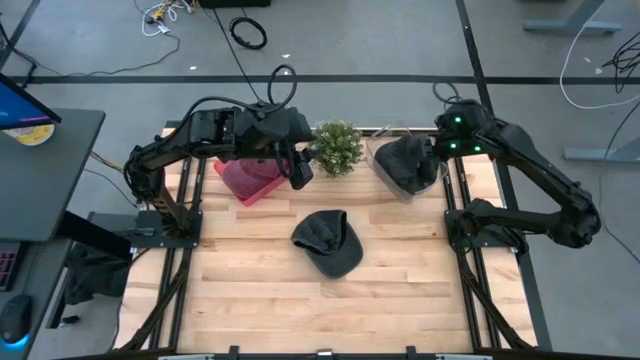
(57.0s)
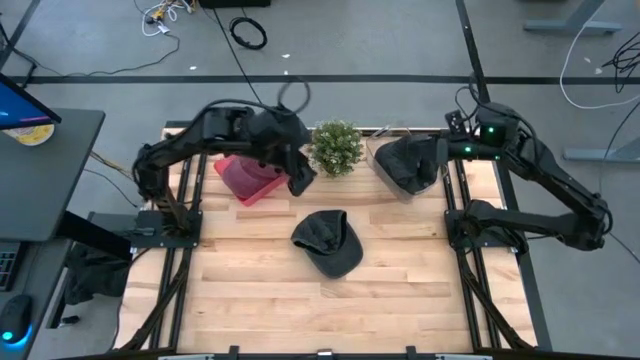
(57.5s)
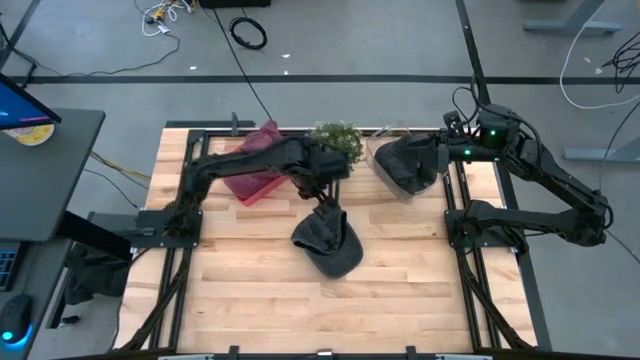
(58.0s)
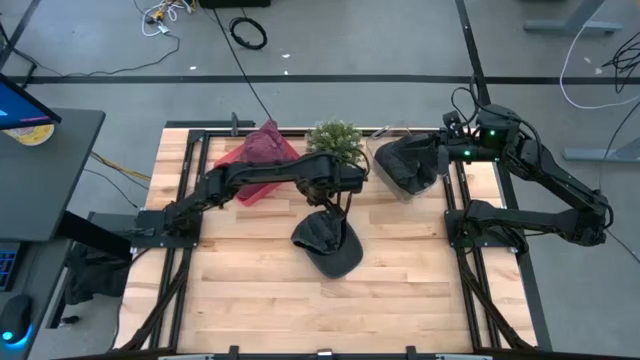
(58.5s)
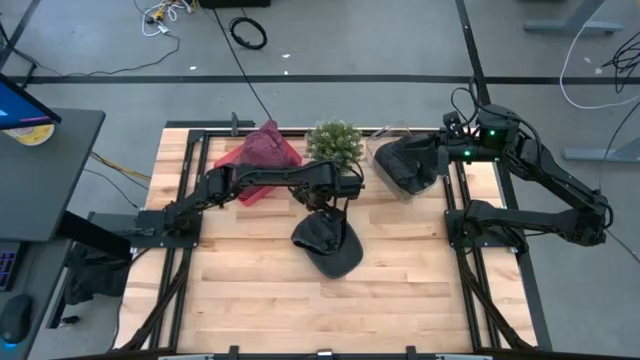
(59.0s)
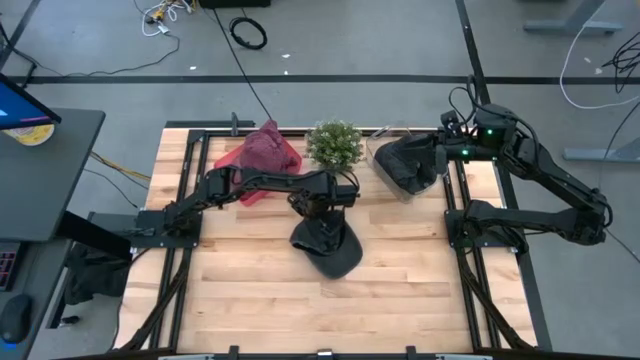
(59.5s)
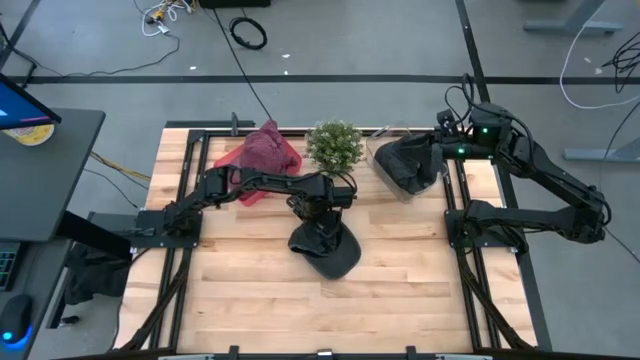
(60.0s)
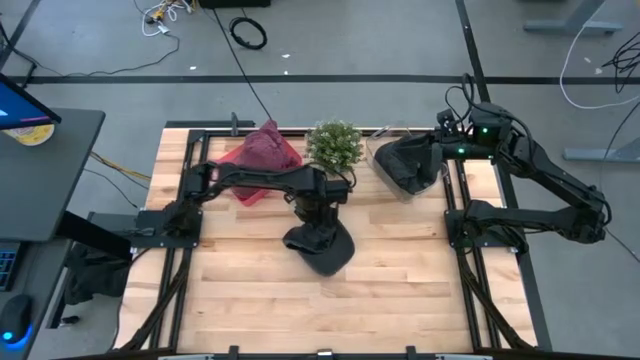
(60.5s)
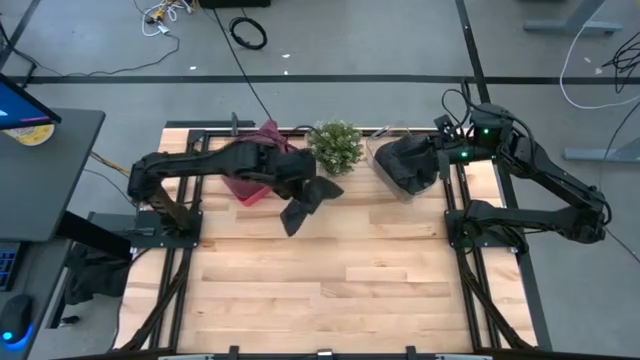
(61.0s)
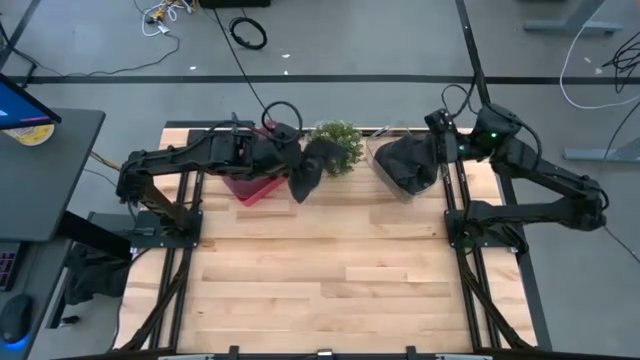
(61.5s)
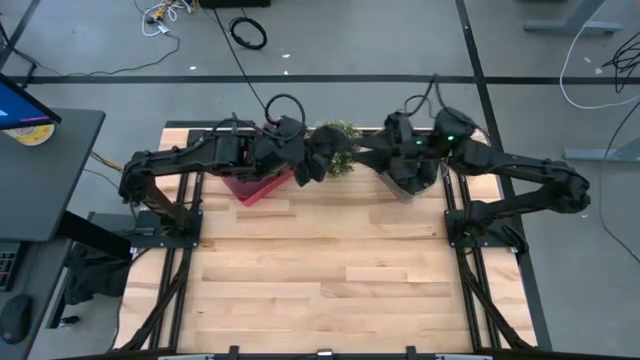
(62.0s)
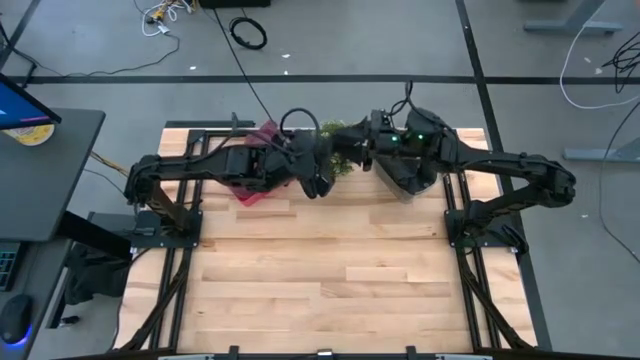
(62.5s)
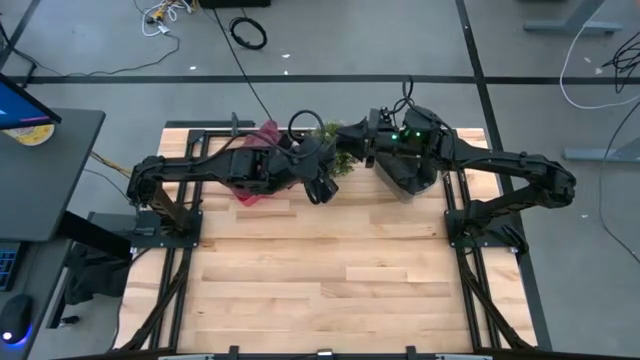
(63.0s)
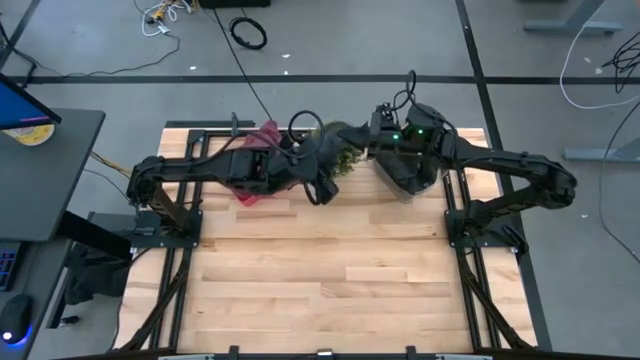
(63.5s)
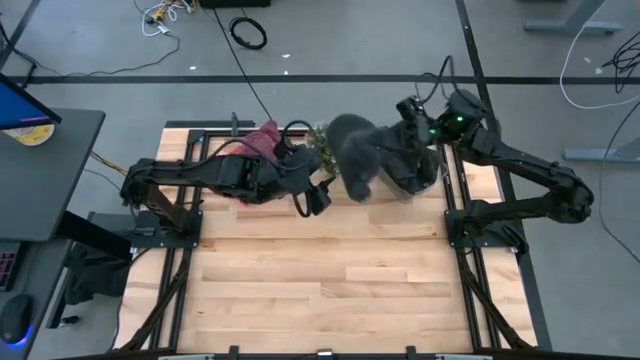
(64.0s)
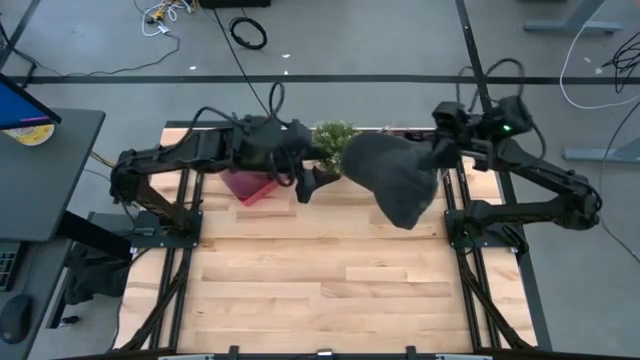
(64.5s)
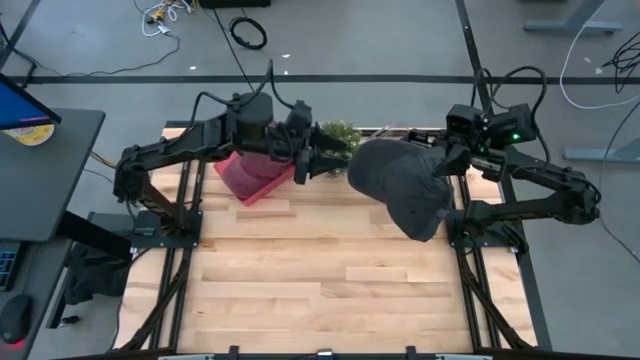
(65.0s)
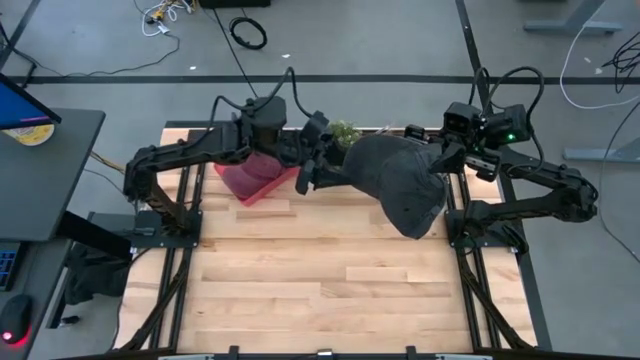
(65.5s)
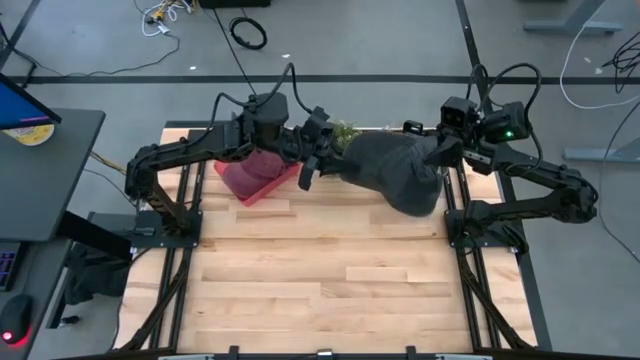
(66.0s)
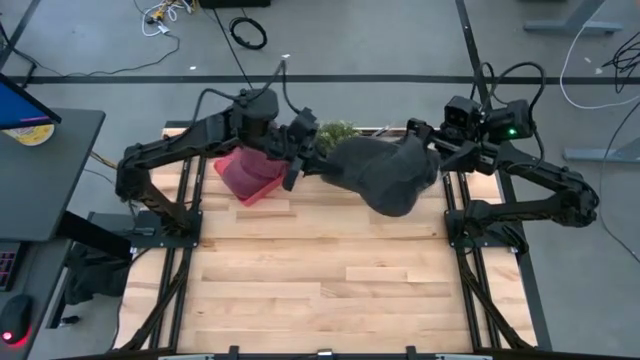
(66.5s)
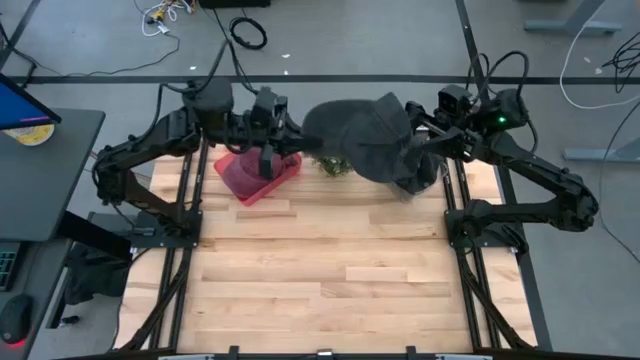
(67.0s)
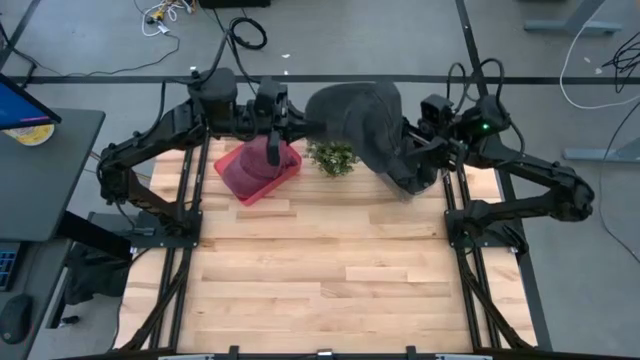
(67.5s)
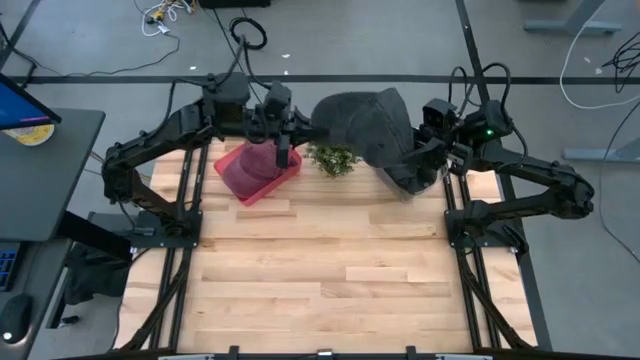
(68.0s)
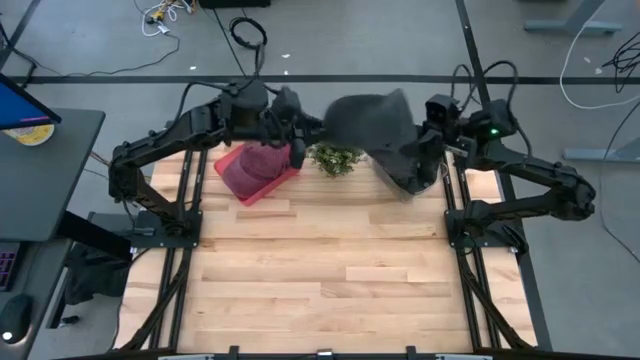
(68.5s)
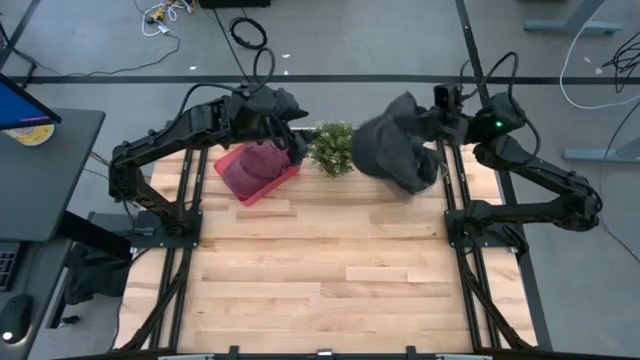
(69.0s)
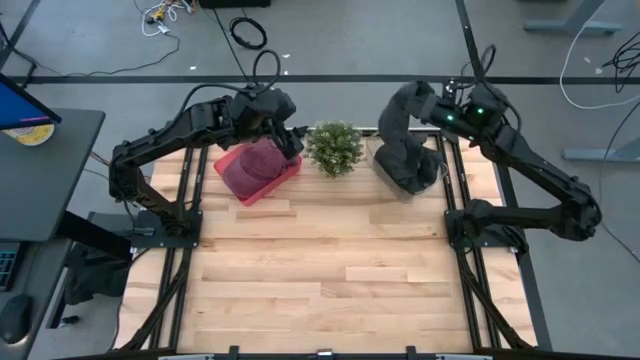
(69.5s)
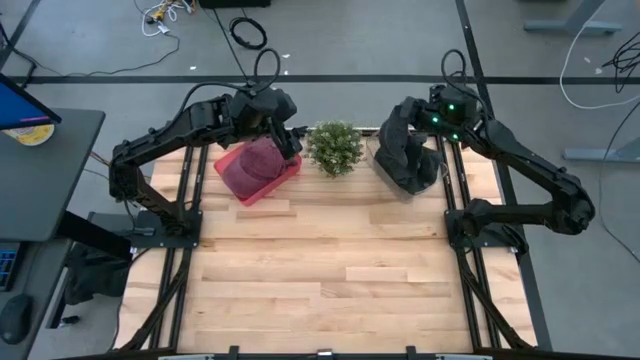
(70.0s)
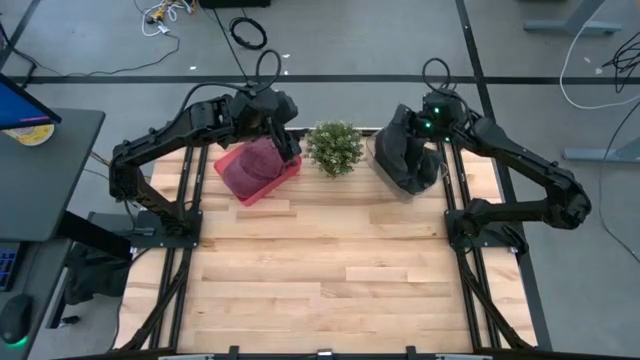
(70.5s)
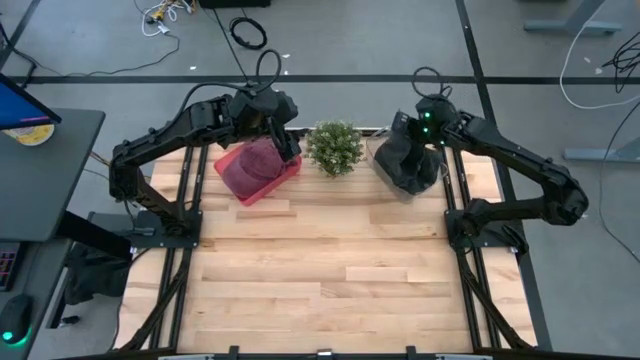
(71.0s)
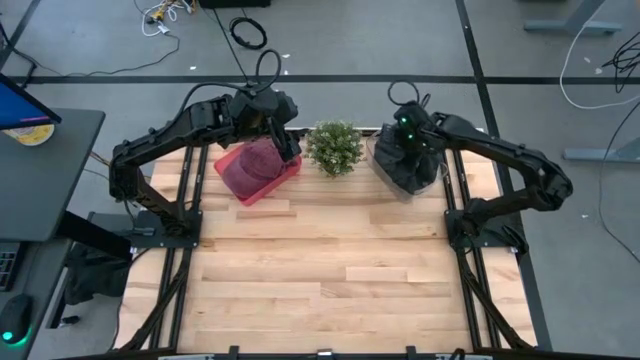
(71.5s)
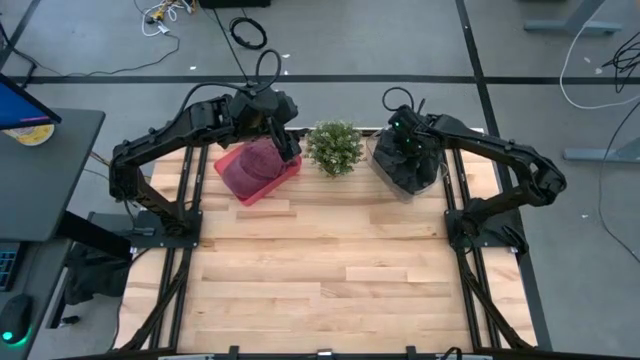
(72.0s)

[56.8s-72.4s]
Task: Pick & Place hat
Put the black cap into the transparent bin

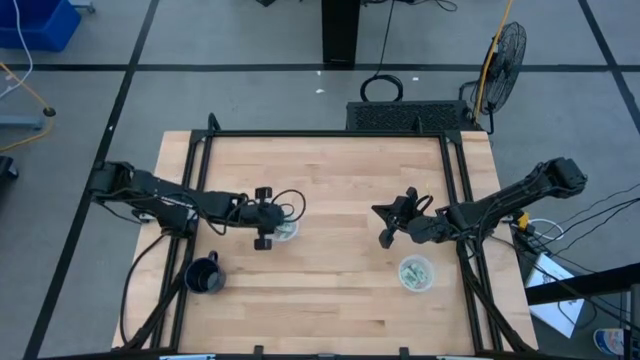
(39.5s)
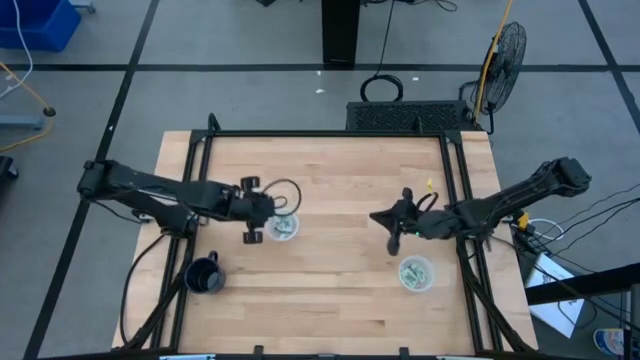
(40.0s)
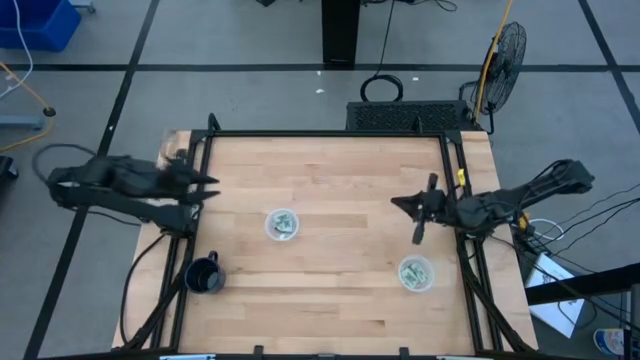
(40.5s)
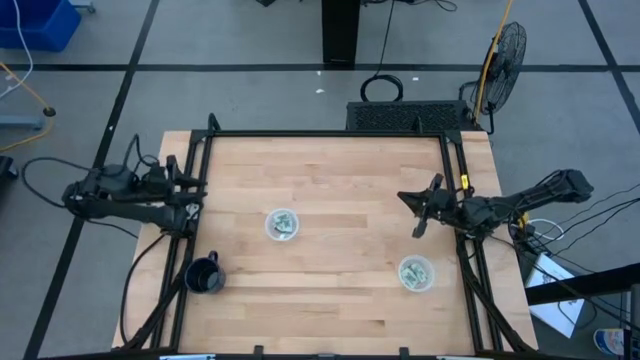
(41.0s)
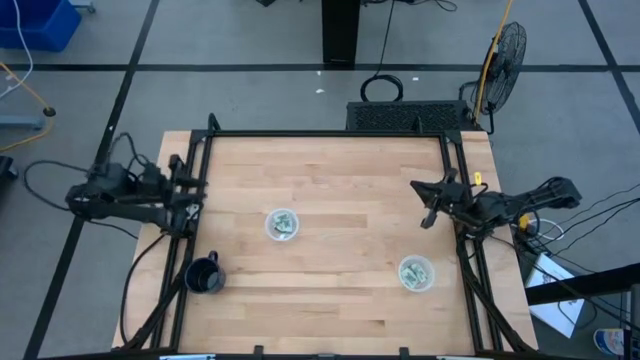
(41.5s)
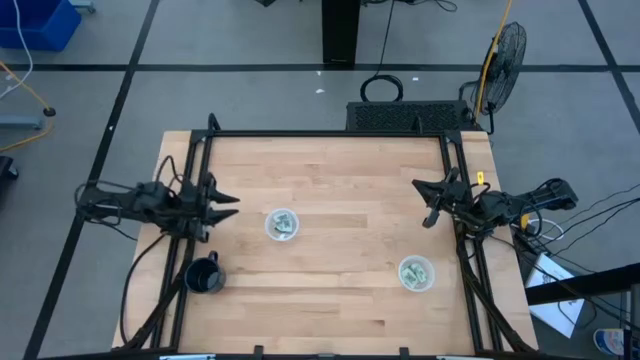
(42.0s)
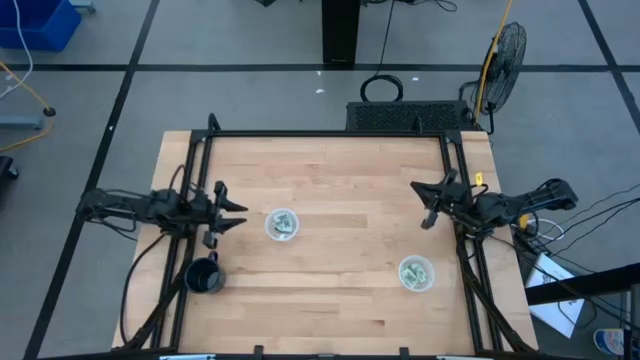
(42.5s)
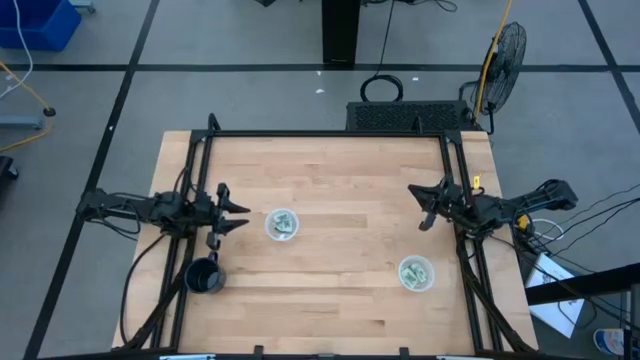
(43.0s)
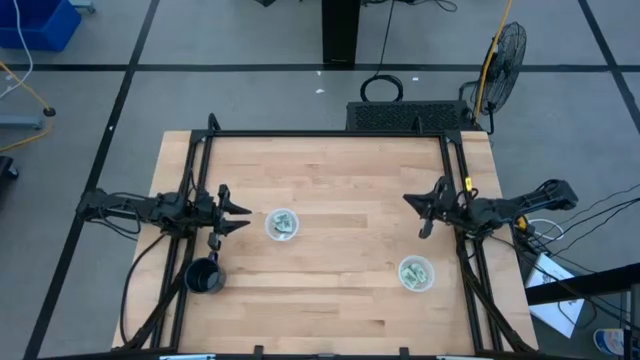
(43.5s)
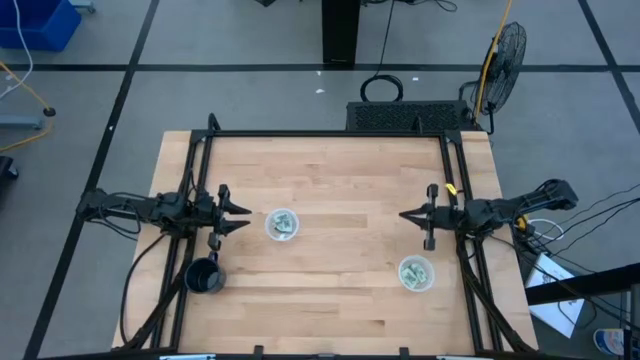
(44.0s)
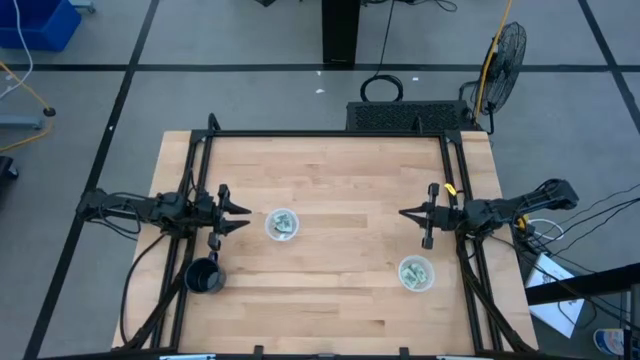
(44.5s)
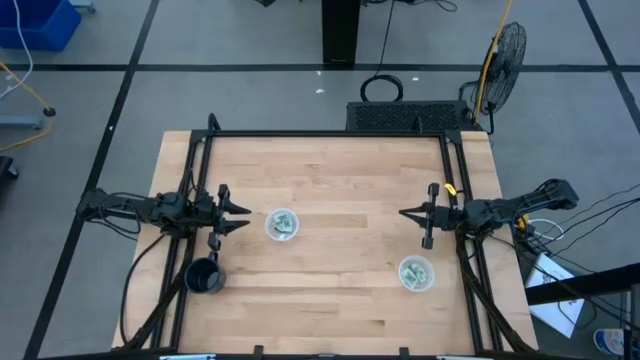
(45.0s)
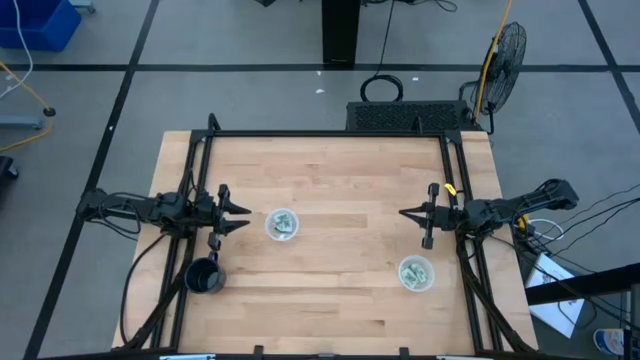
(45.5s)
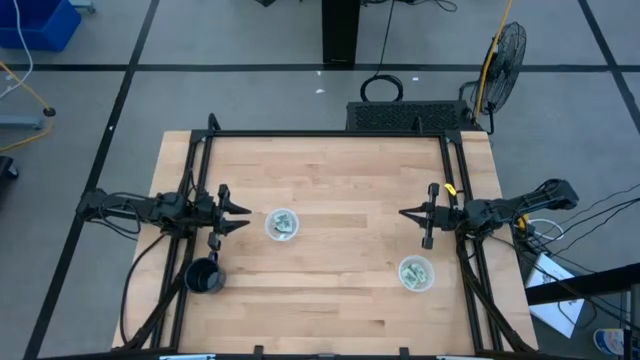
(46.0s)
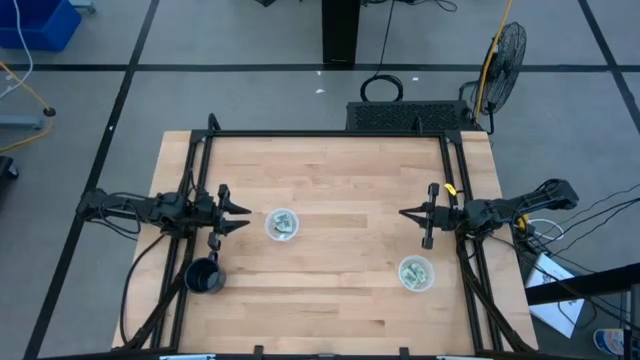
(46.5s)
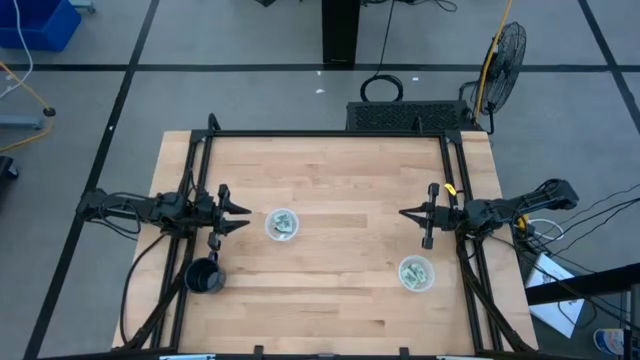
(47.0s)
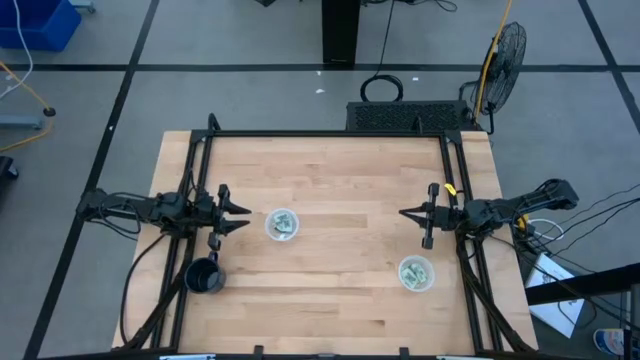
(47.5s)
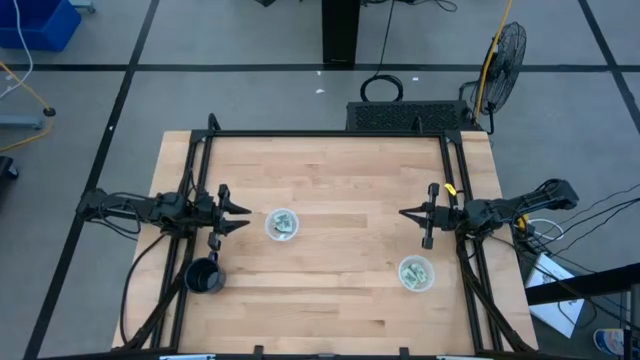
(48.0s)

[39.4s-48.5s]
Task: Pick and place Stevia / Truvia into bins
Return to Home Position
